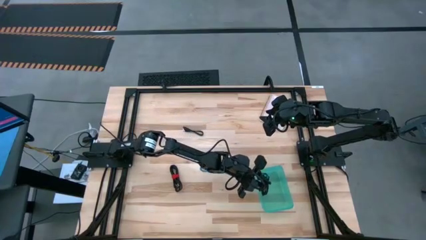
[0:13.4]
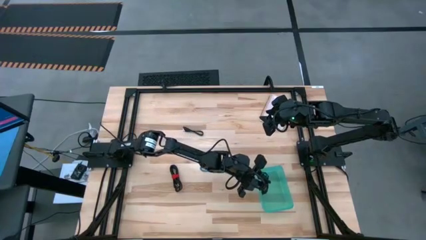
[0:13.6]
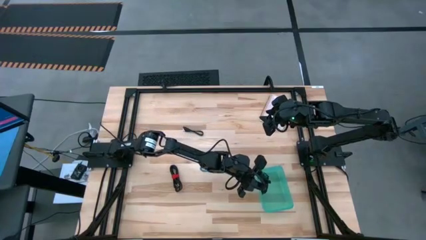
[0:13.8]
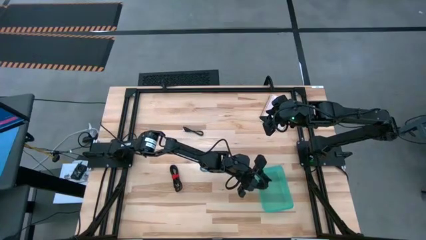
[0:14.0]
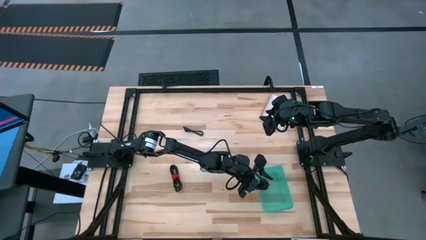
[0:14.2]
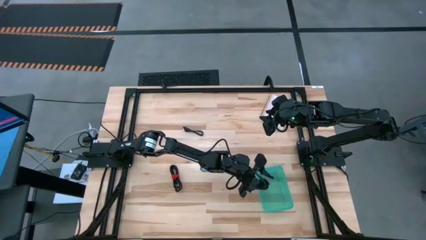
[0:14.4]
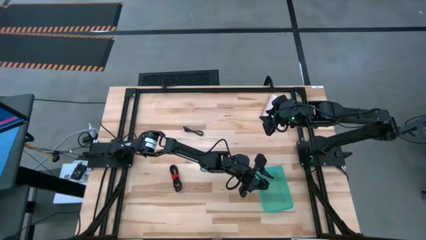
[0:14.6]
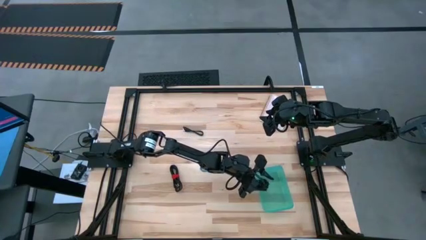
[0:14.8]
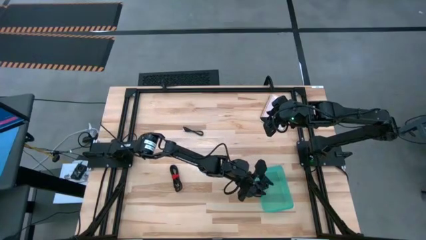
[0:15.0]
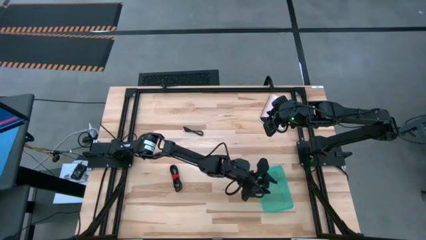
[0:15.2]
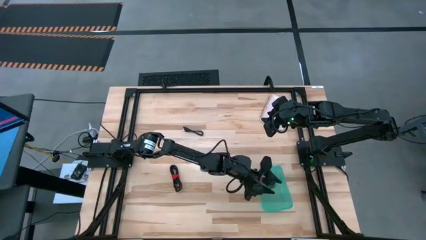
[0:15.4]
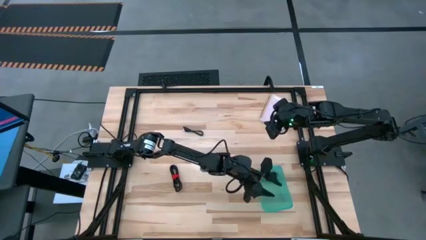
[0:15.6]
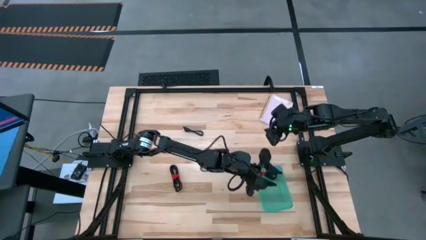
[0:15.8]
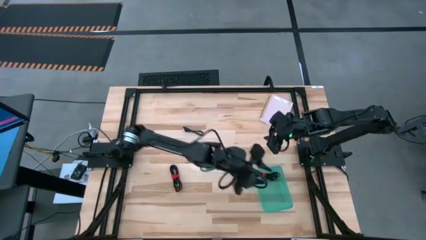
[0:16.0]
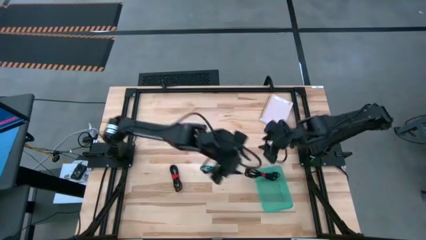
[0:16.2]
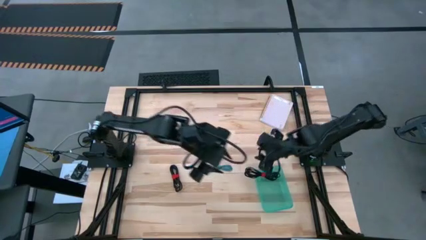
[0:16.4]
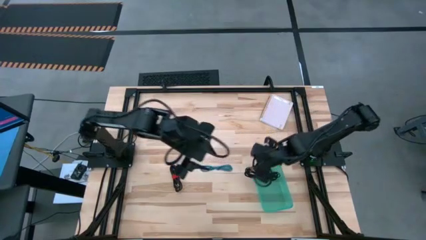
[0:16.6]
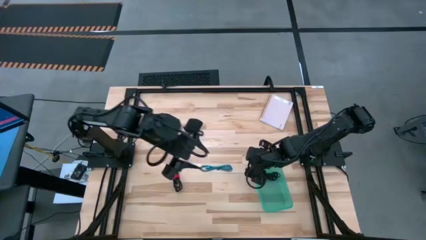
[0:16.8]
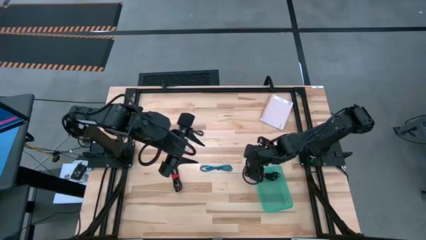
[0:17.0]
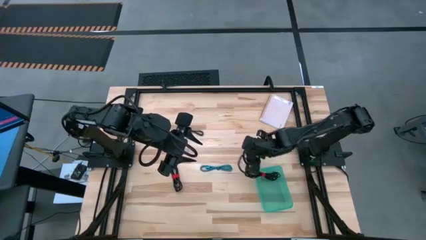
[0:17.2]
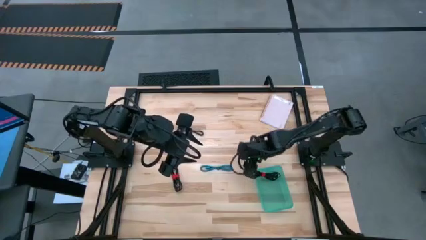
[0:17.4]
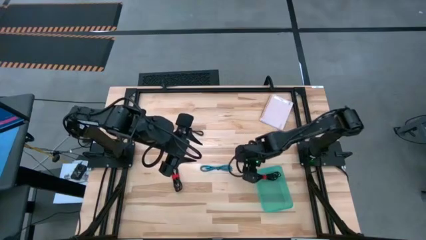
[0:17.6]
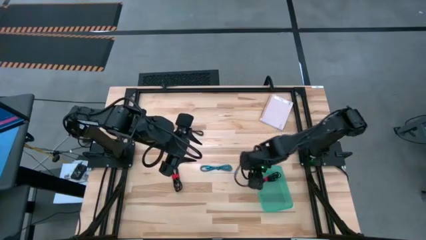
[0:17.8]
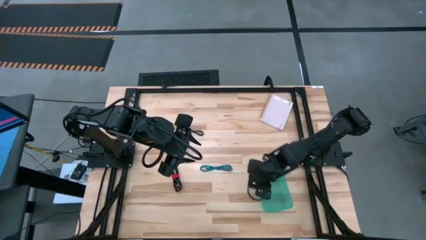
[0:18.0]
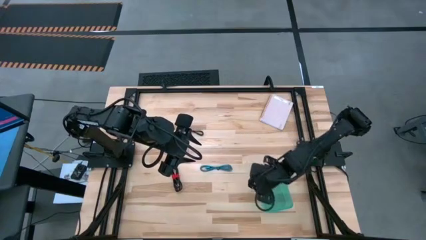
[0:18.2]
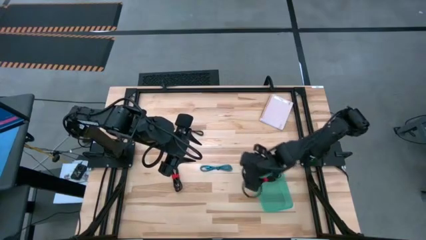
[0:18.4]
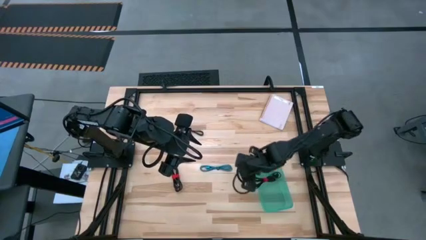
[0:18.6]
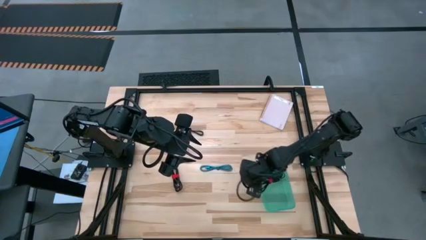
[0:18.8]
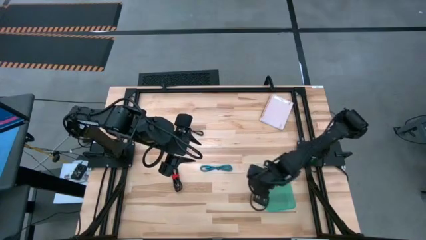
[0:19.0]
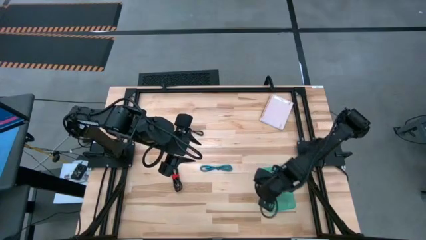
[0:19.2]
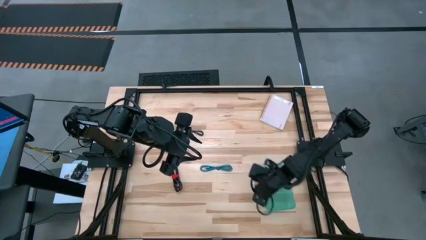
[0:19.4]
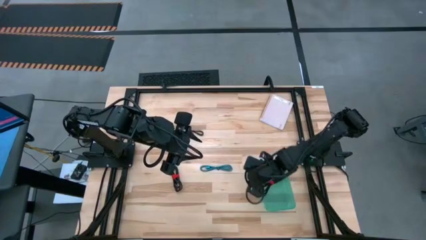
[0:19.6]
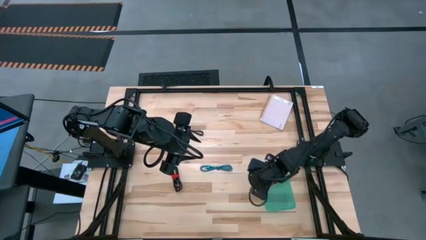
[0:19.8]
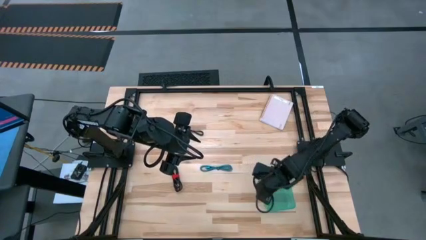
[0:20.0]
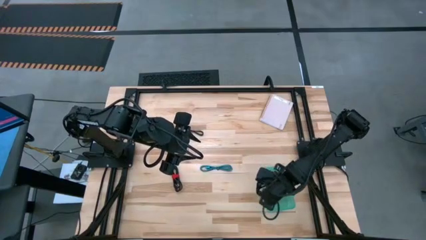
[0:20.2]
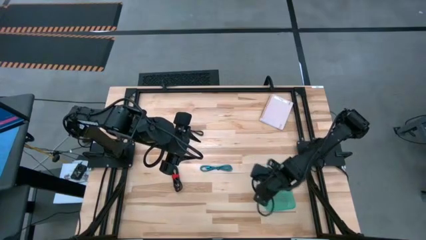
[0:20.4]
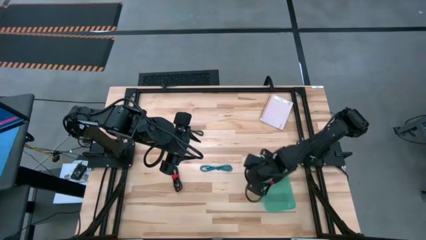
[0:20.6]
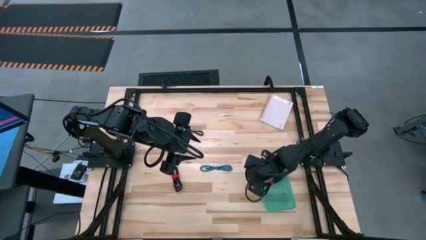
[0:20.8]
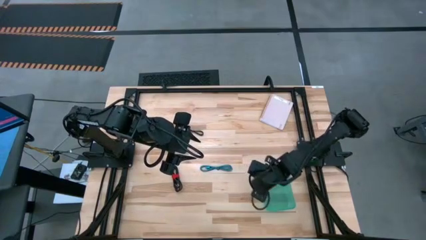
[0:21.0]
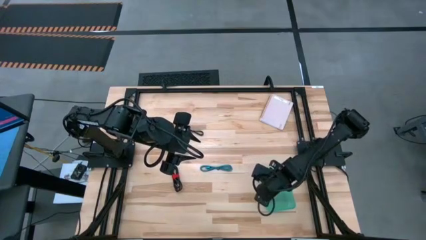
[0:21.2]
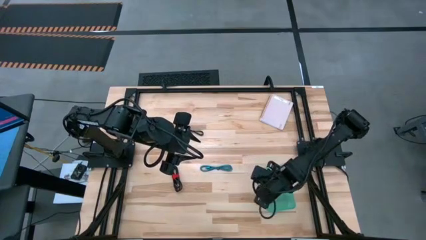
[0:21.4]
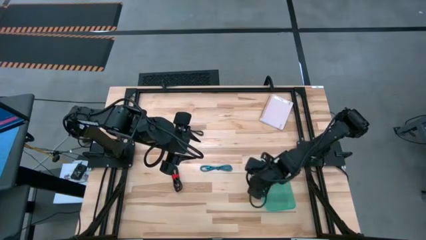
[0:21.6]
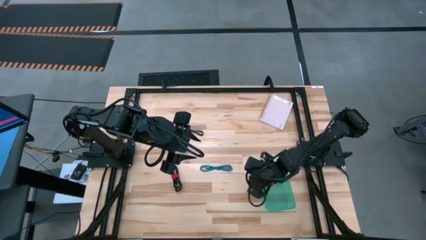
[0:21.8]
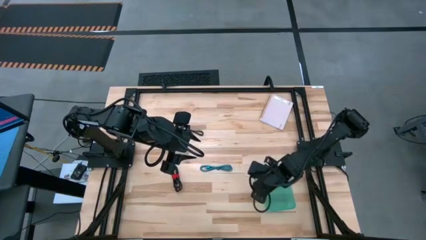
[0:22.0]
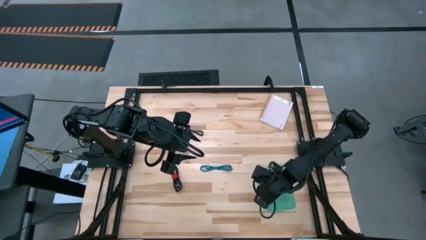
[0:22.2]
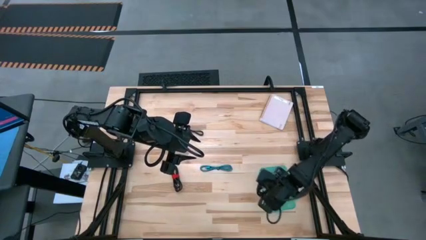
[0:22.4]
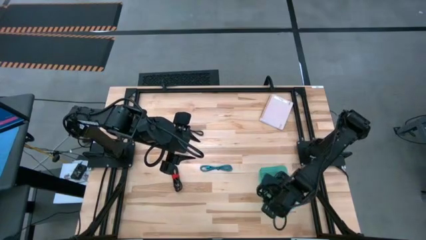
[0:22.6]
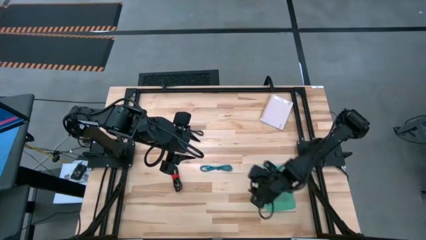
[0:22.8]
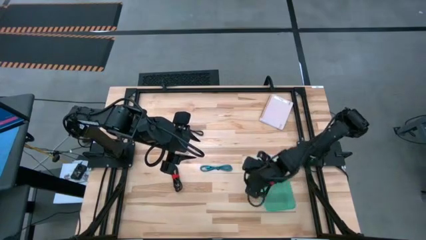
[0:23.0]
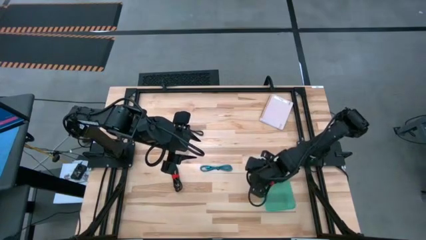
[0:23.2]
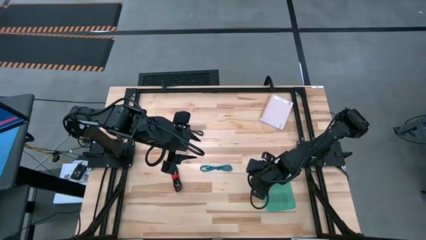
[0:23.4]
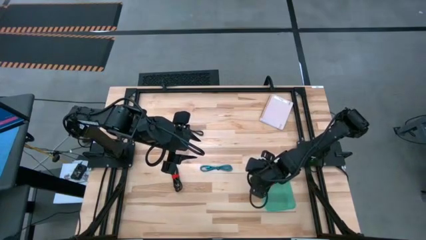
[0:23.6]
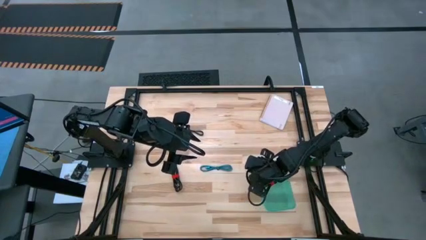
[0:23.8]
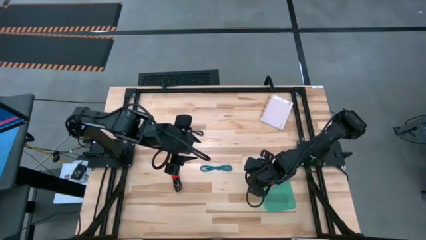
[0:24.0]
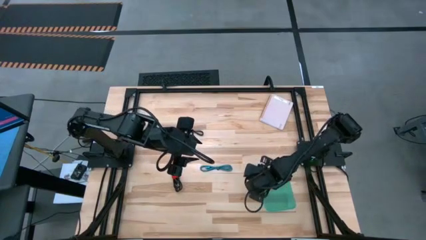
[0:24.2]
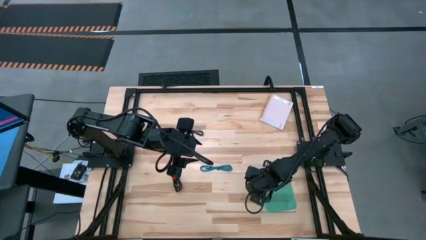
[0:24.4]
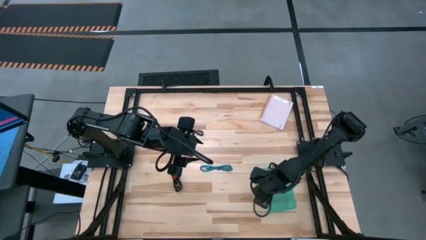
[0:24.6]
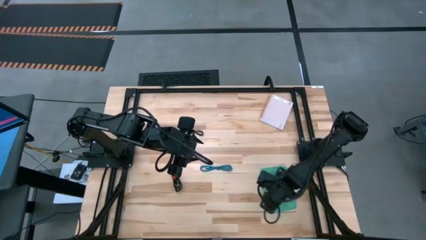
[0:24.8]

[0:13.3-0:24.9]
Task: Pick and place USB-C Cables
Put the top right black charger cable into the green bin

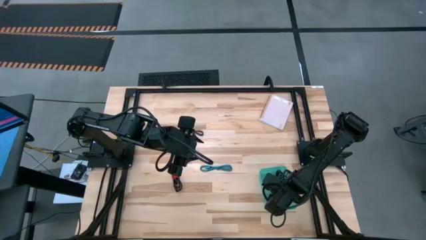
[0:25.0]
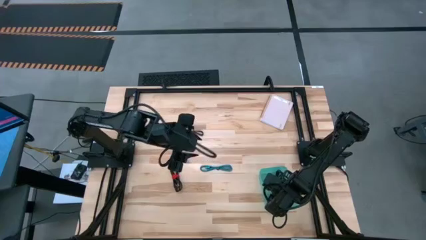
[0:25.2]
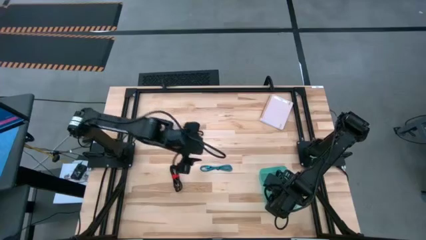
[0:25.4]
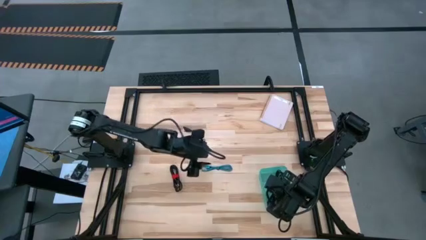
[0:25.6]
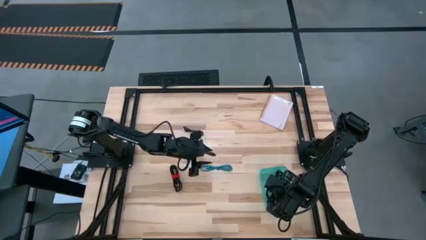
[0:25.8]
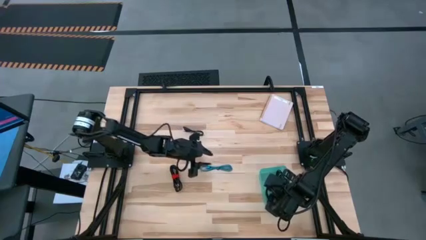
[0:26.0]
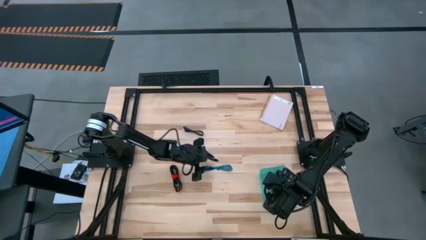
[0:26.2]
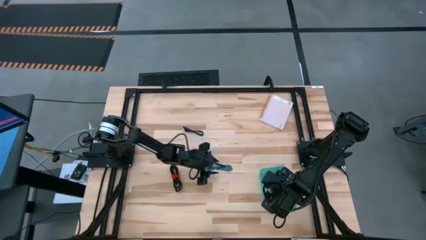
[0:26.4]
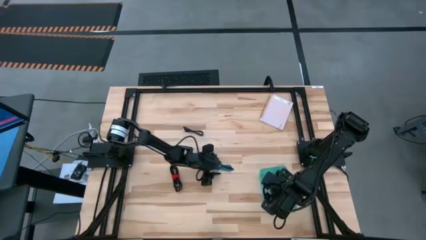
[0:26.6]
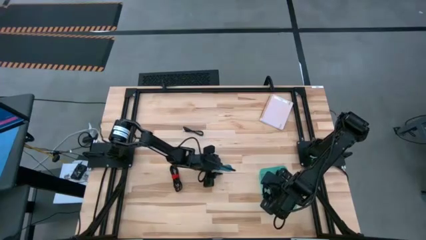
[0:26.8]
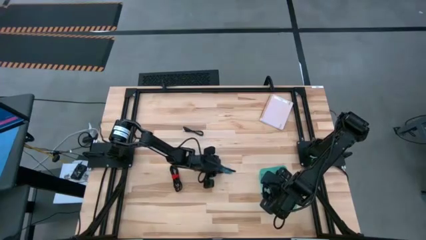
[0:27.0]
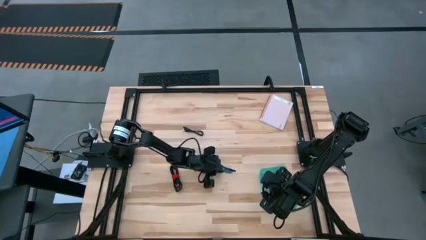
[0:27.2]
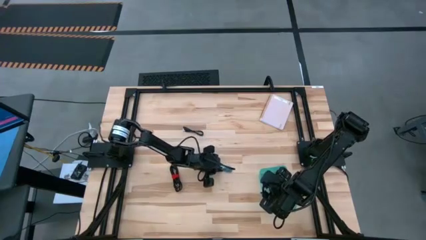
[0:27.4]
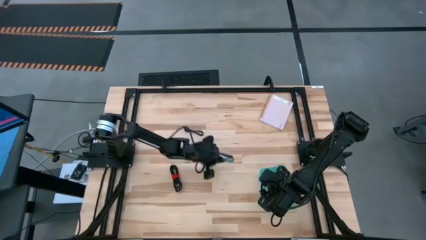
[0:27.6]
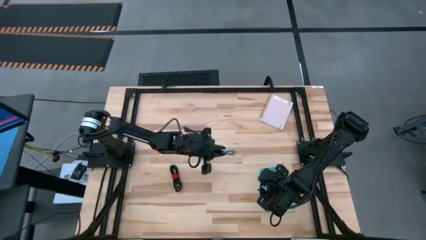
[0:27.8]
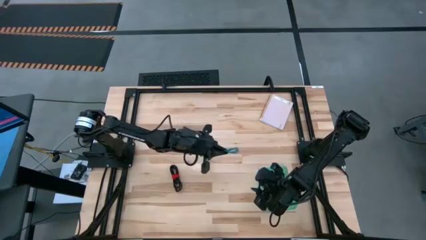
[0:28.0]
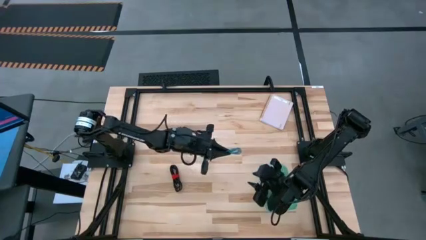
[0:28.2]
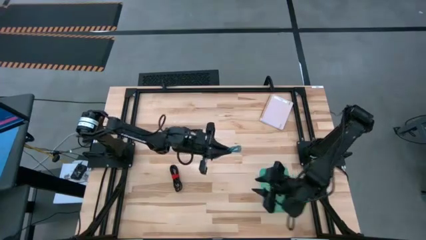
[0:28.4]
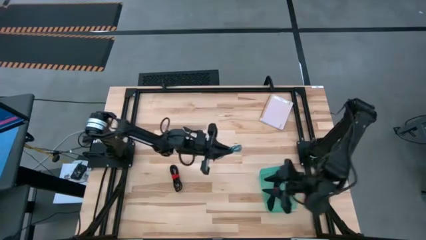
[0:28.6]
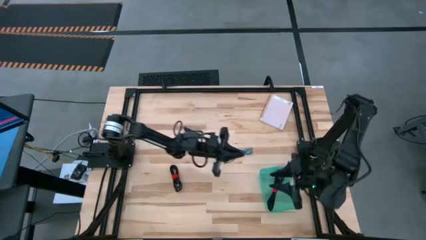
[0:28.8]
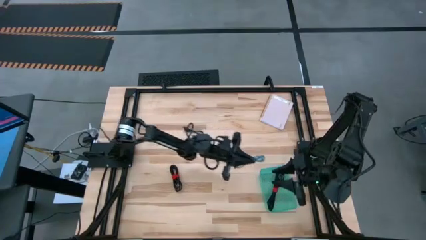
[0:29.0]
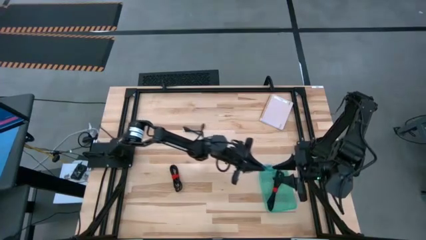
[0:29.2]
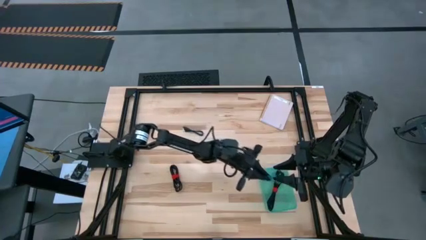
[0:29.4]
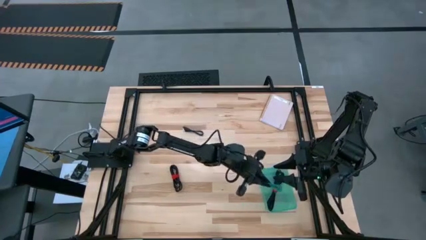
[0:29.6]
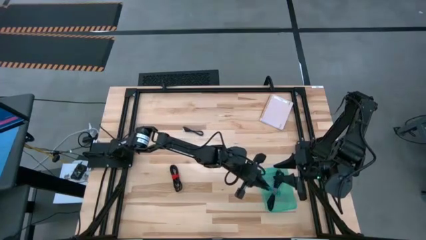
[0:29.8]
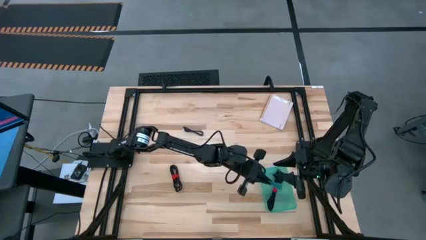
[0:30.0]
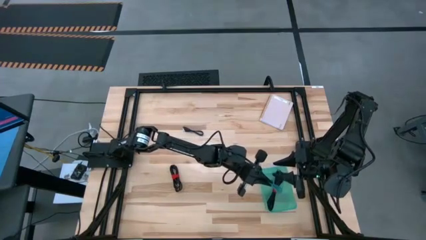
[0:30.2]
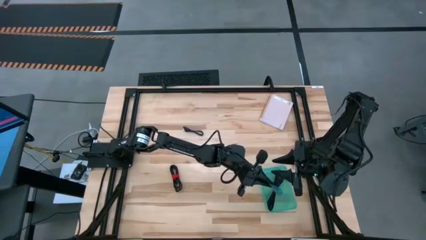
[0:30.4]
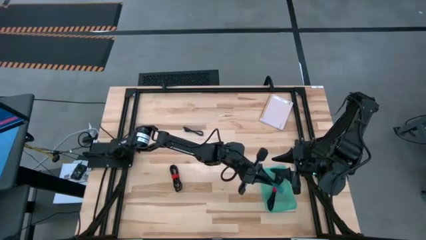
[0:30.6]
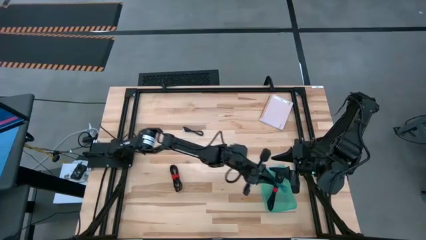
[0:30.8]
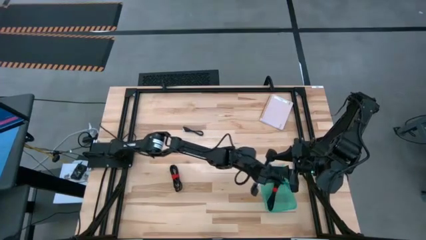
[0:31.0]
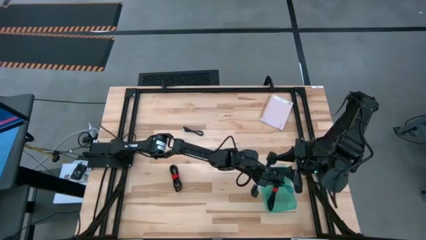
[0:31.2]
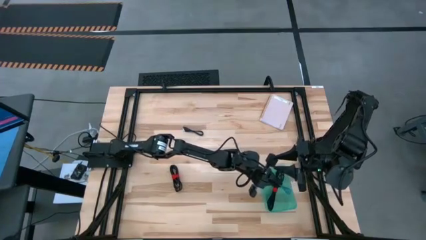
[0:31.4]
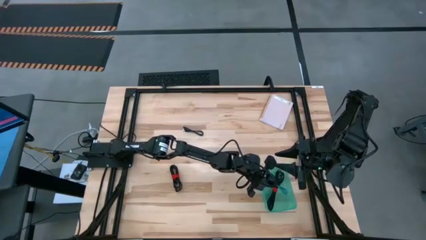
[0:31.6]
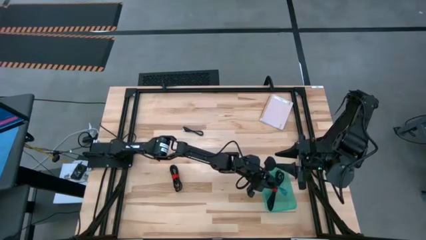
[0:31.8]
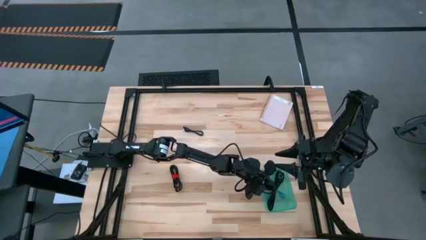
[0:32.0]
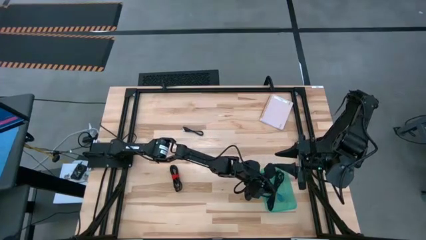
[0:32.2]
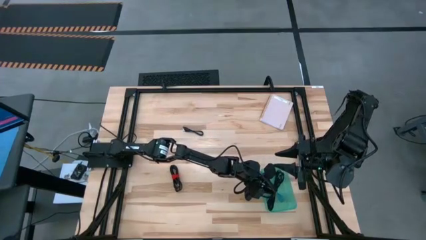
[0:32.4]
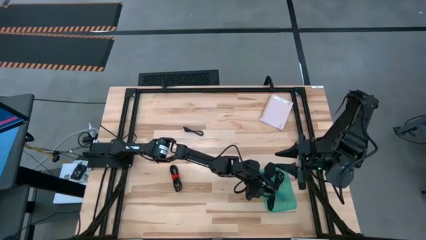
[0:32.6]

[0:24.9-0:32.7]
Put the blue charger cable into the green bin
